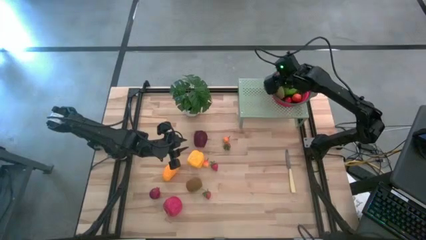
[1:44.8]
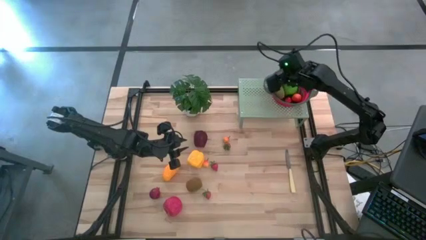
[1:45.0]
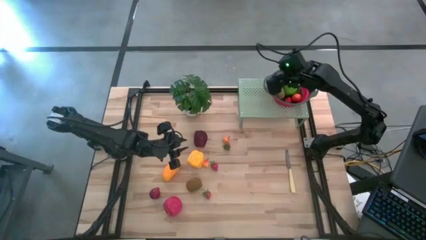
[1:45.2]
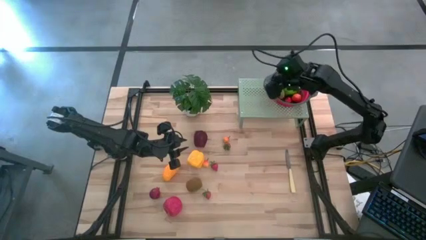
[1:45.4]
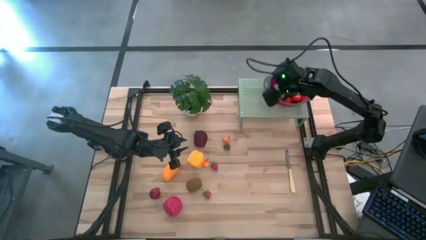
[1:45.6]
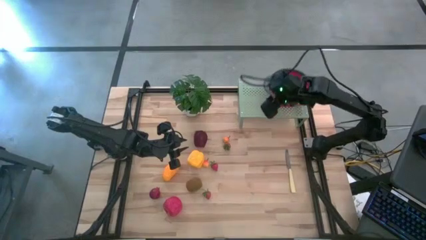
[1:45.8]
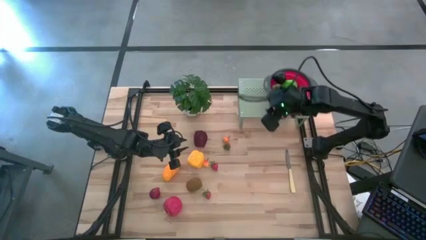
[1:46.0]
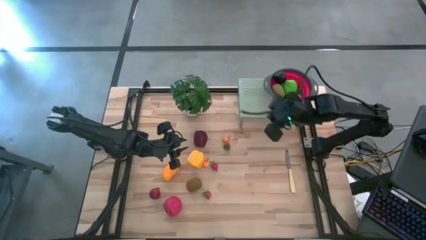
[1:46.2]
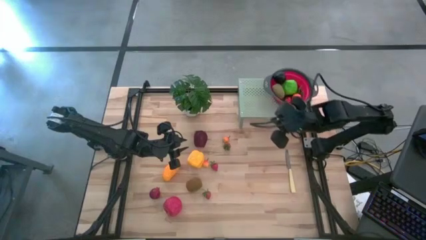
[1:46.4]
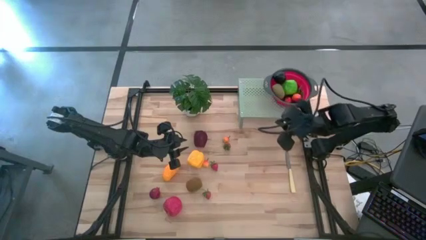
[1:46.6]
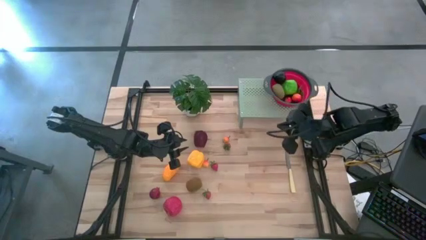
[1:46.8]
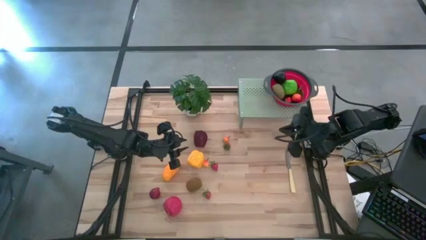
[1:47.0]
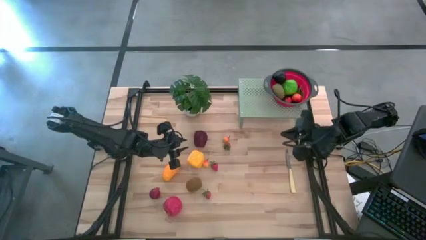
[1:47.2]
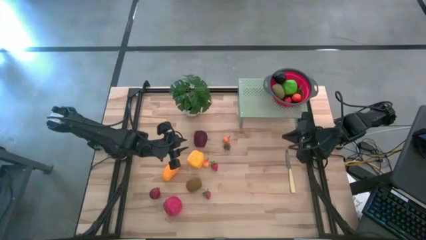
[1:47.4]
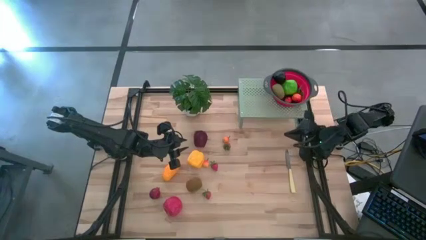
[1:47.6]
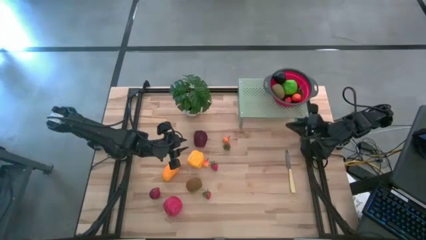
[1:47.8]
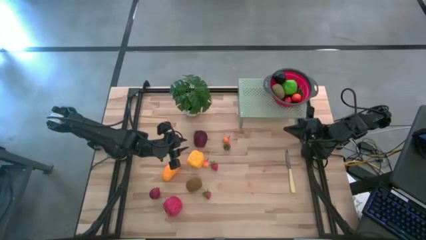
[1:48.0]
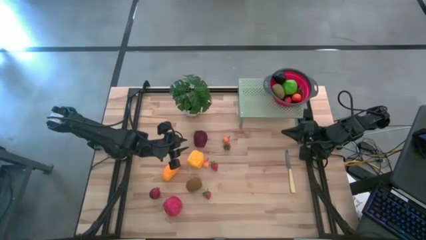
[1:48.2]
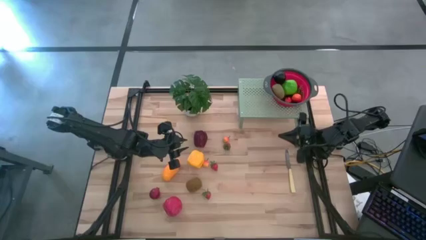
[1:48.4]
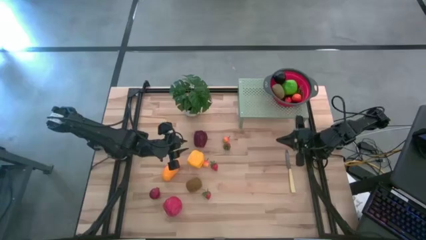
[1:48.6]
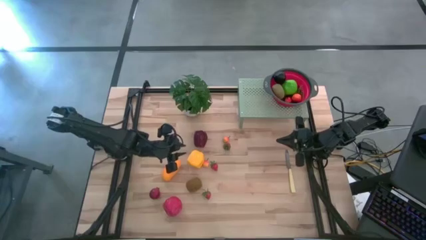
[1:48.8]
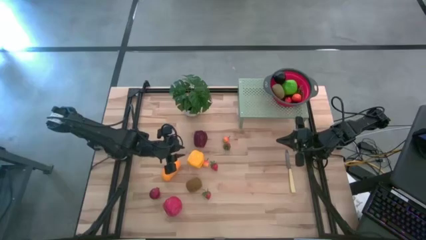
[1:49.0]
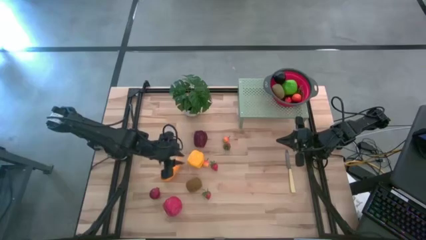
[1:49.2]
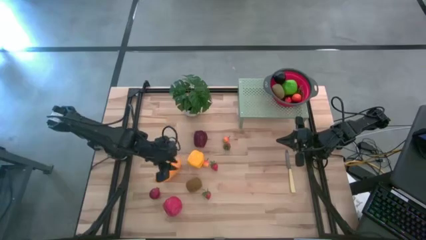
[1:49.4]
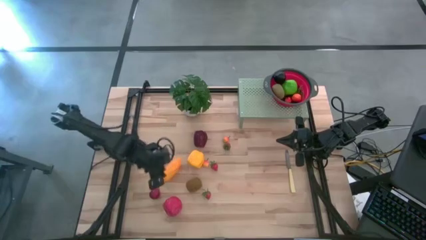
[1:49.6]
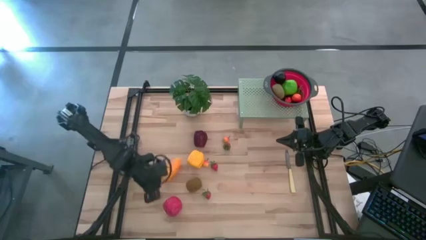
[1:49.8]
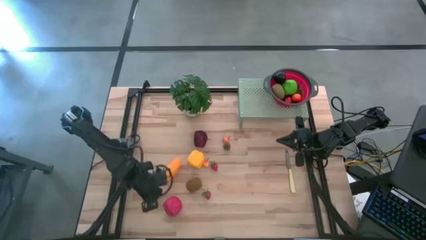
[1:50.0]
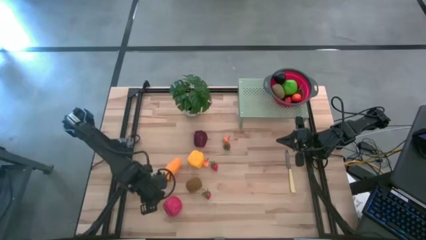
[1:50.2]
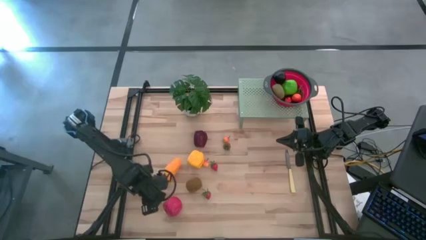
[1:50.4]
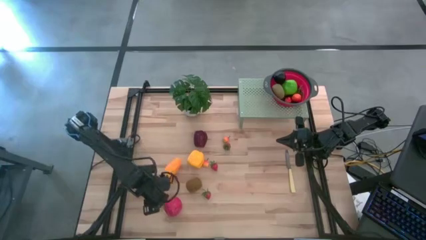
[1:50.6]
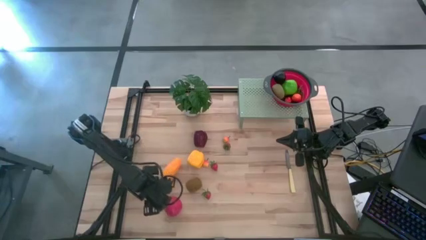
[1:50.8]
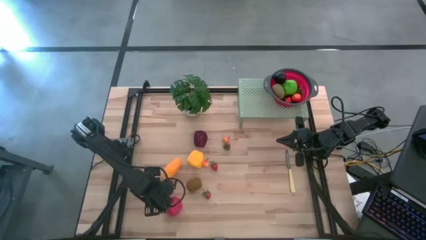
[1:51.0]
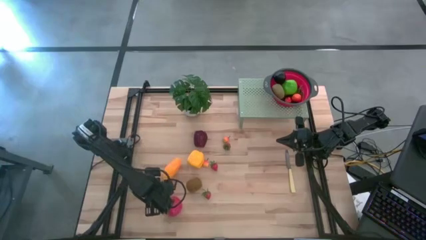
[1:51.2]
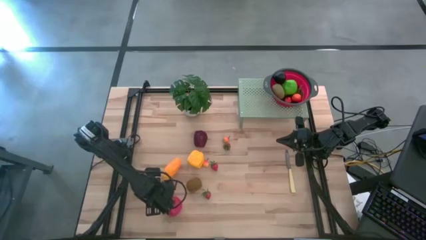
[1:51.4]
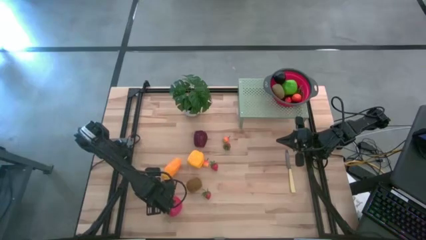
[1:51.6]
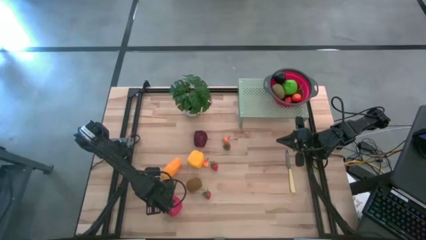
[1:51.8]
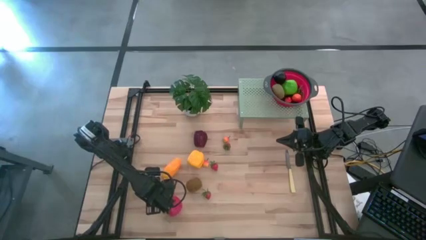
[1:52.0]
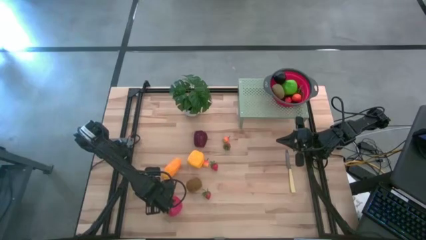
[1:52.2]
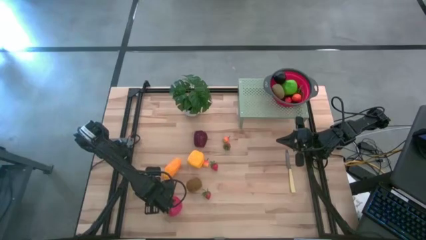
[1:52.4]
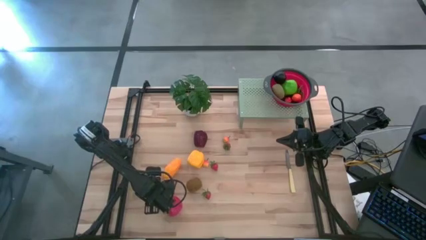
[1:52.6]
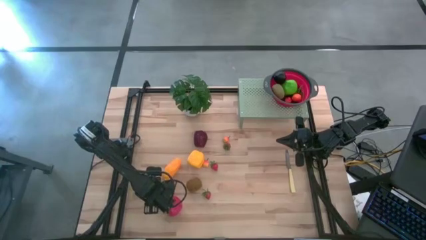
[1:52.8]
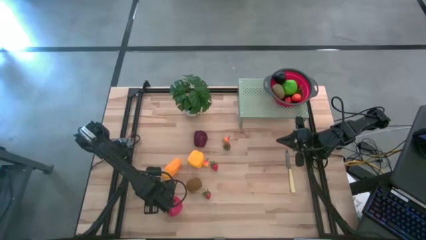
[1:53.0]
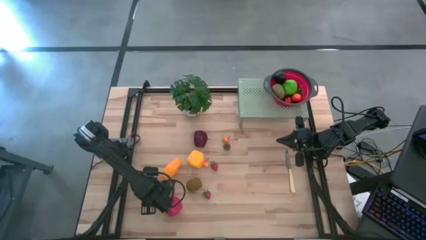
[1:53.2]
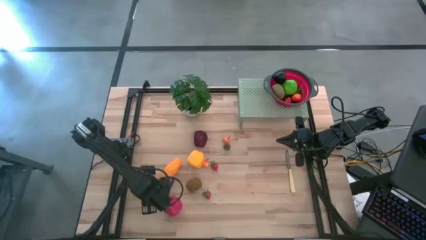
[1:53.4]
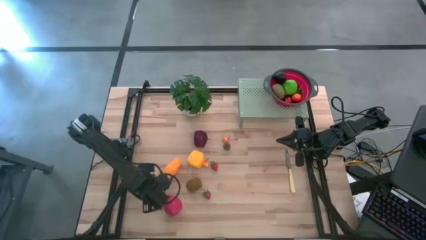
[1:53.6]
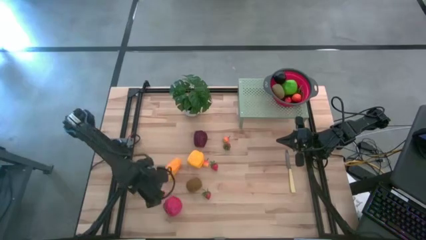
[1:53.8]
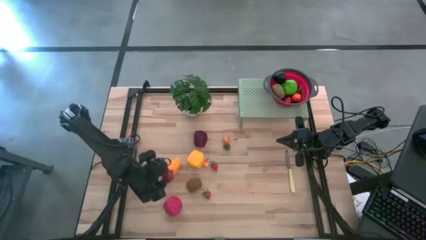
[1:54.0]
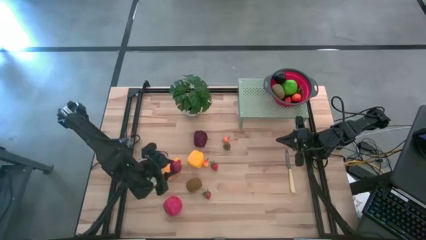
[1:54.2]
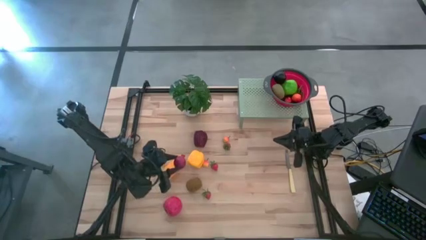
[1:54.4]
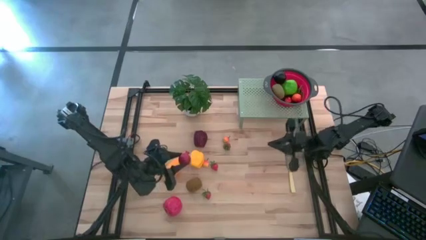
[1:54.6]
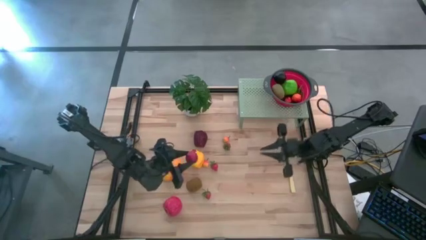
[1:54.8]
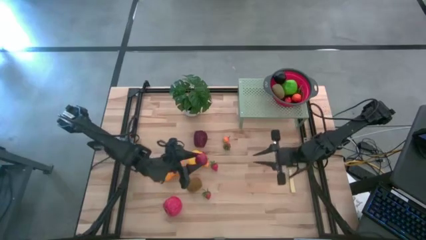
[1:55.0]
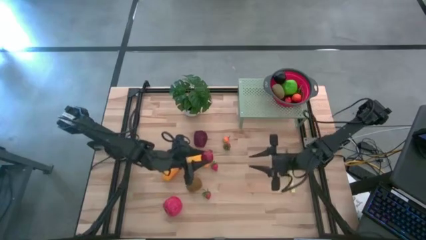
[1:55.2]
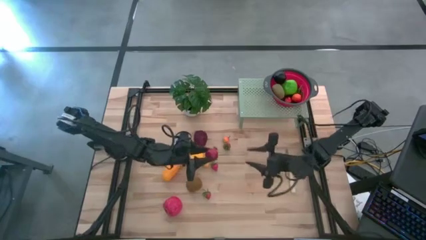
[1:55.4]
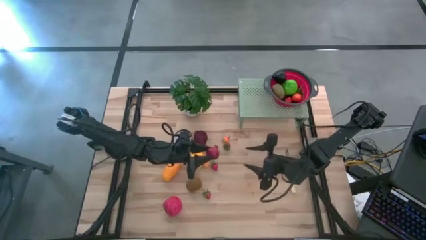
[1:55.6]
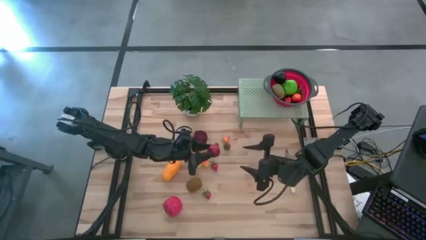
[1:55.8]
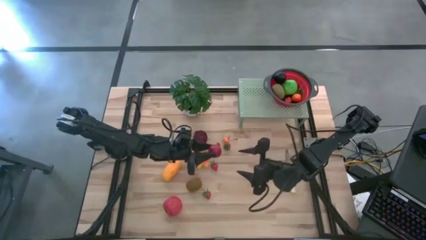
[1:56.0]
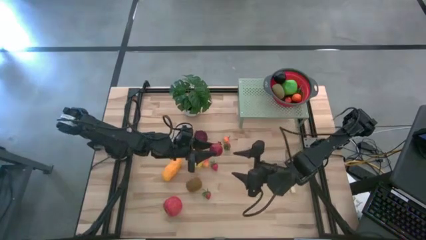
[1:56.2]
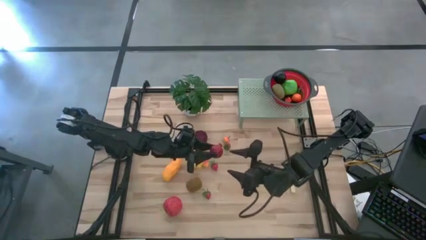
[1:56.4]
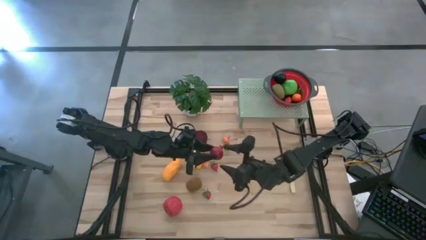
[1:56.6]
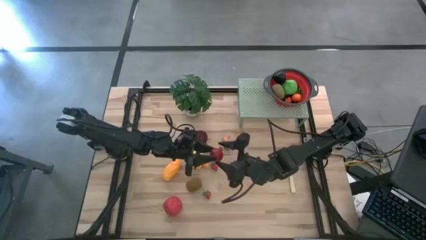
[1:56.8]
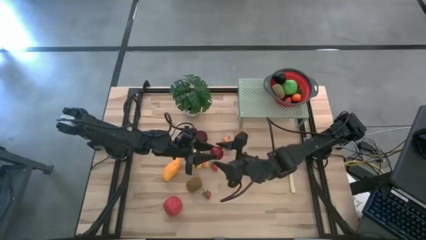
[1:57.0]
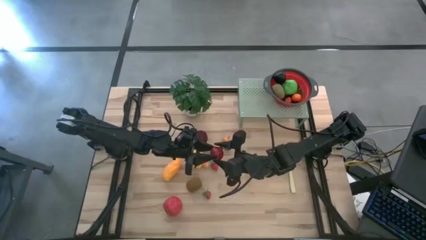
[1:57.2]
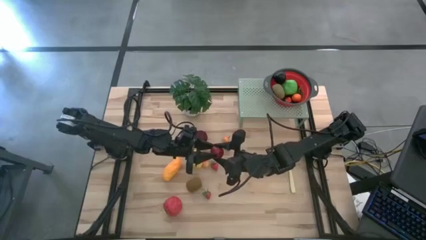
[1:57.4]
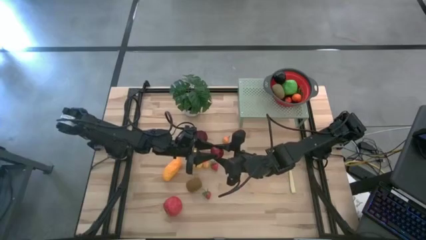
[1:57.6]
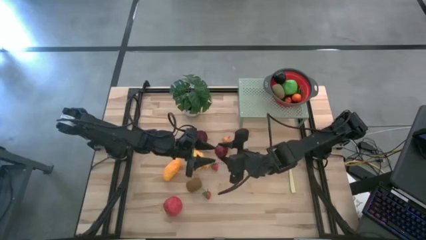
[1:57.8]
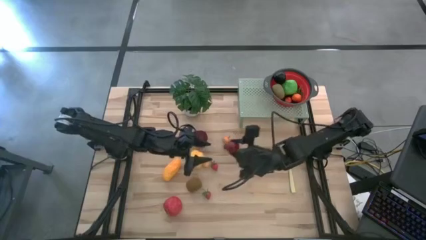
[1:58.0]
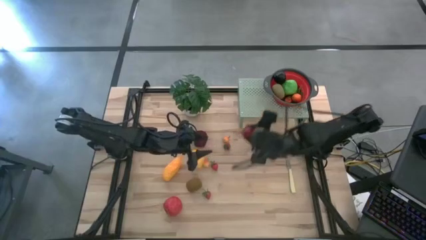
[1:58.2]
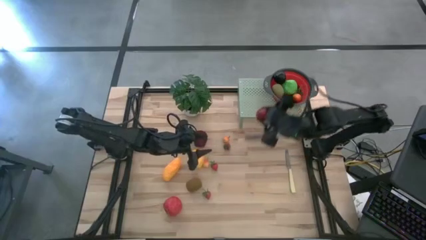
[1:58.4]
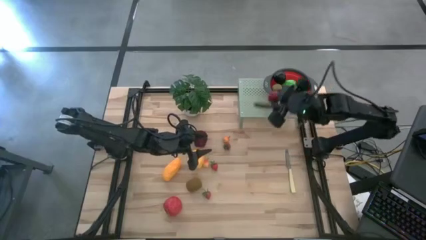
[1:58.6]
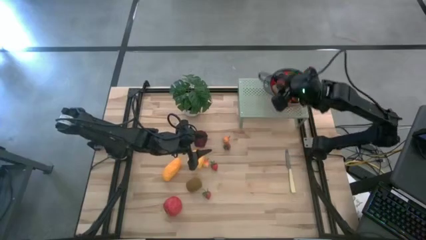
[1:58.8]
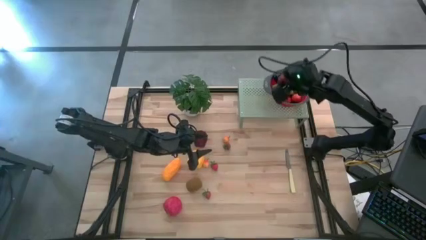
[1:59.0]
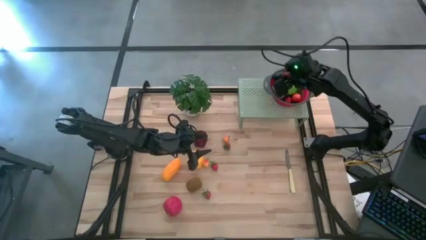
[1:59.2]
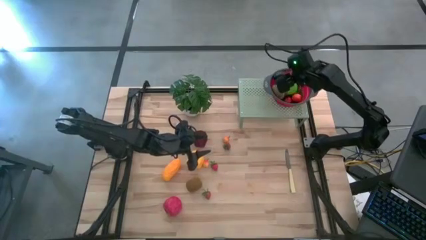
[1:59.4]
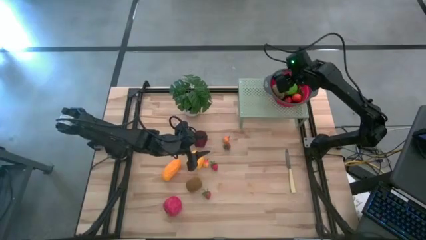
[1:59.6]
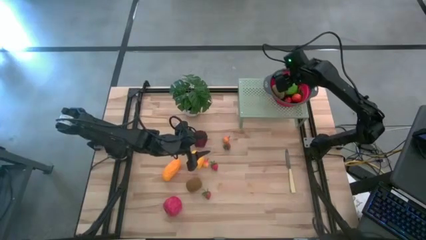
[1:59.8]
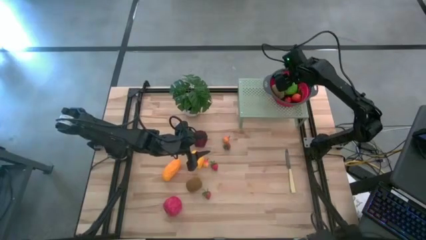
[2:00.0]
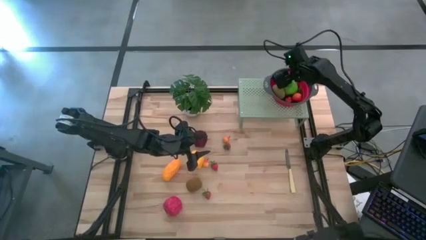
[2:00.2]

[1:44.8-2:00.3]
Task: Pick & Place Fruit
Put the red pomegranate into the red strainer bowl on the shelf

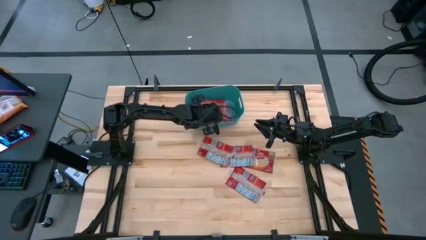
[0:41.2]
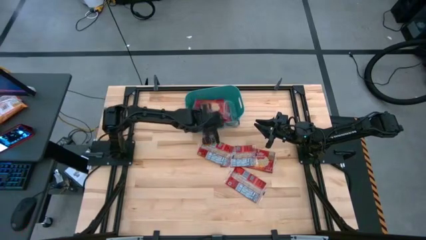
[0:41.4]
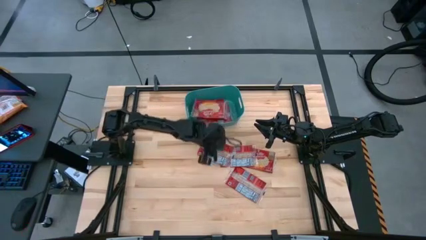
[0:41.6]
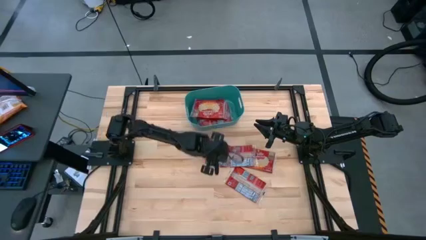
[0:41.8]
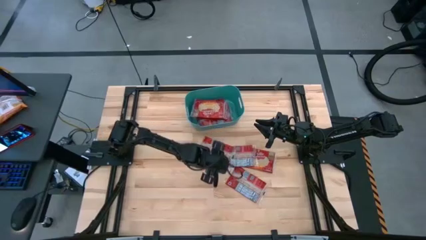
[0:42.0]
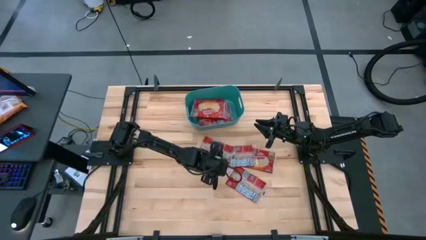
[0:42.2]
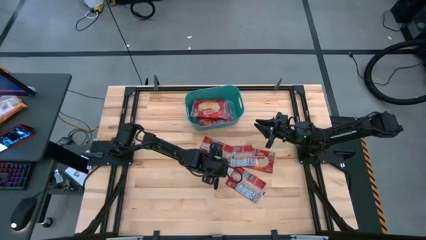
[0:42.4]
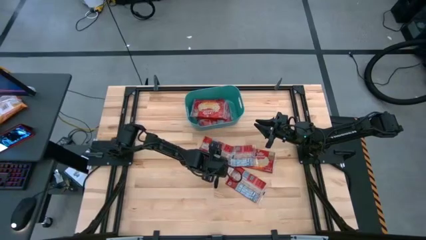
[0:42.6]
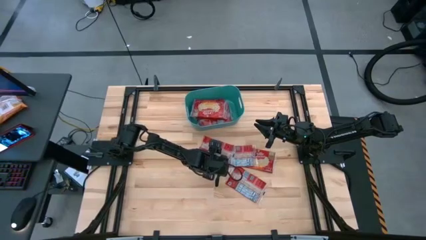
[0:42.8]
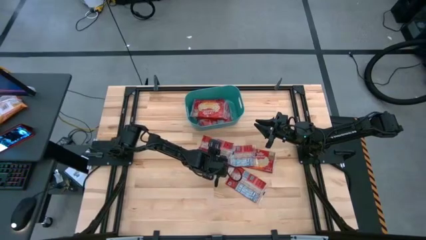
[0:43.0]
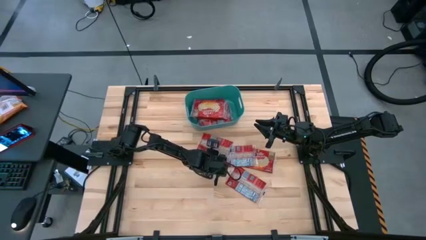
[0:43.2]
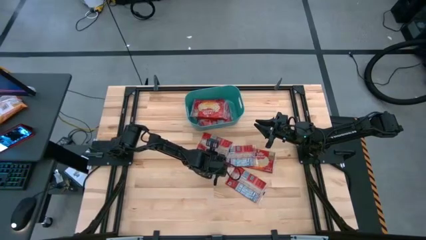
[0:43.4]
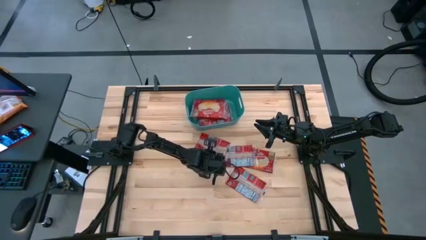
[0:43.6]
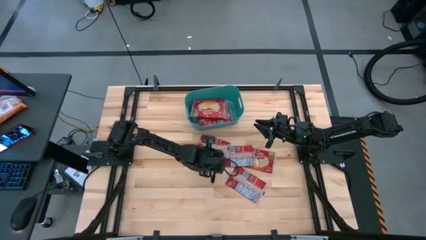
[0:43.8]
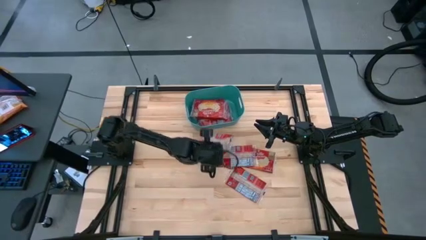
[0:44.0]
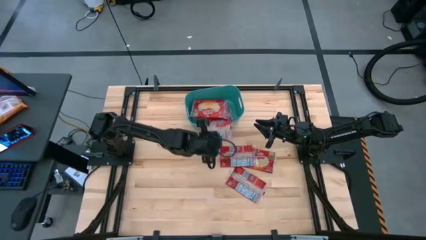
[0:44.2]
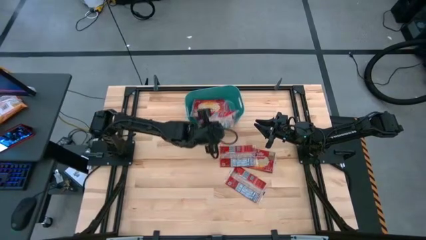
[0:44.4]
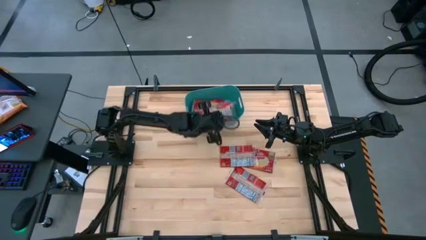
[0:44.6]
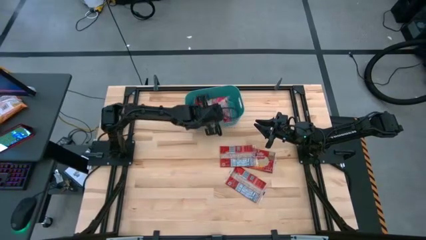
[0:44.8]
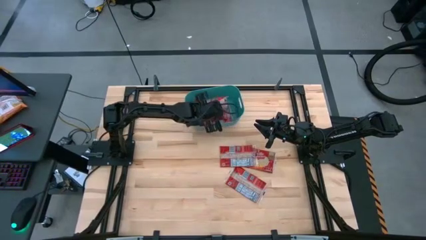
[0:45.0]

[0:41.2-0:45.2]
Task: Sort popcorn bags into baskets
Put the red popcorn bag into the blue bin
